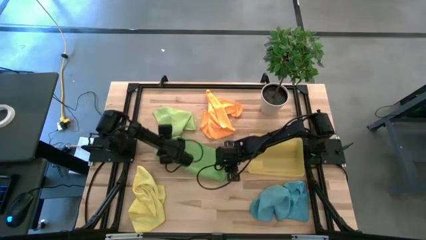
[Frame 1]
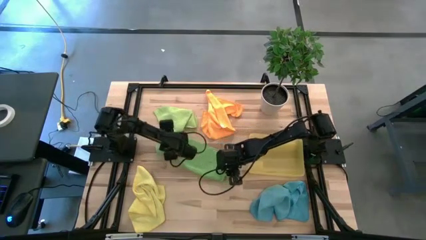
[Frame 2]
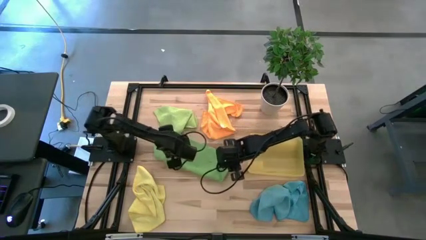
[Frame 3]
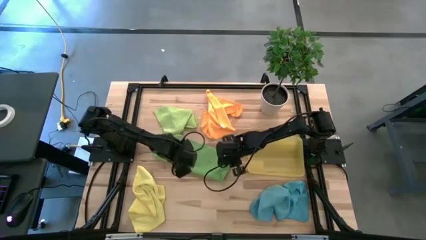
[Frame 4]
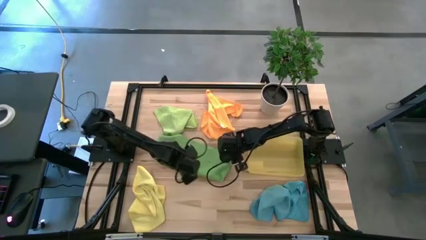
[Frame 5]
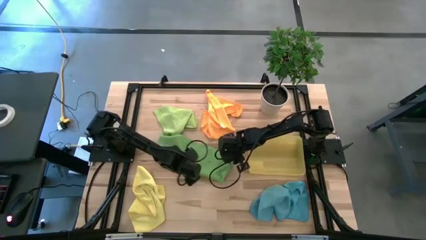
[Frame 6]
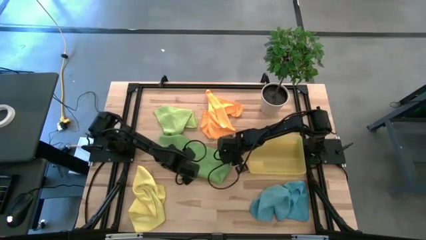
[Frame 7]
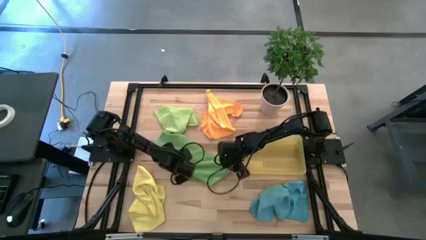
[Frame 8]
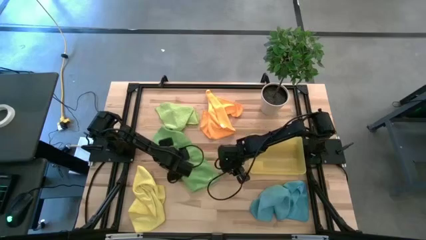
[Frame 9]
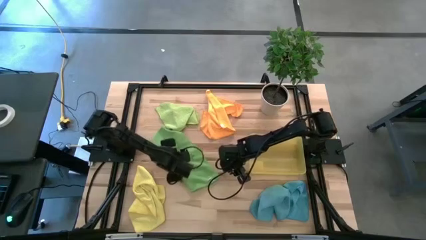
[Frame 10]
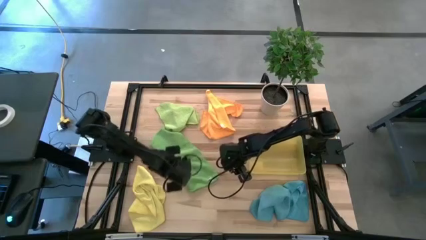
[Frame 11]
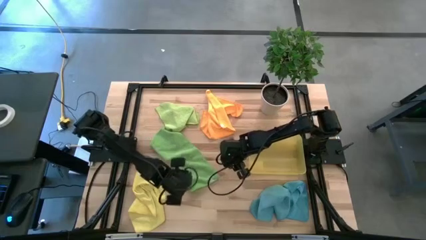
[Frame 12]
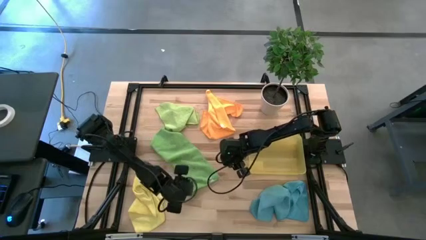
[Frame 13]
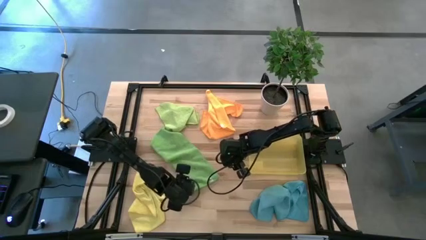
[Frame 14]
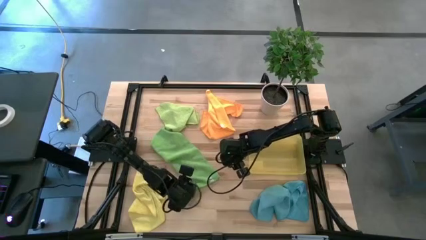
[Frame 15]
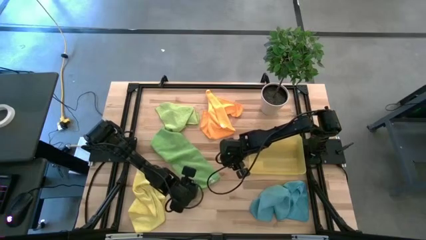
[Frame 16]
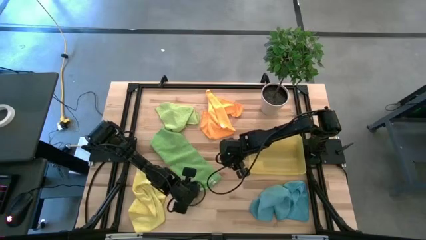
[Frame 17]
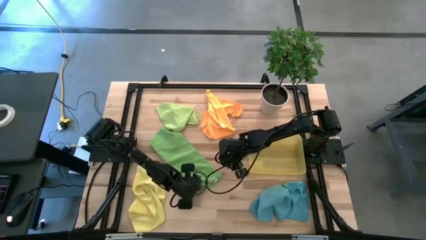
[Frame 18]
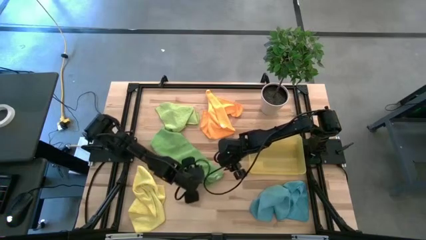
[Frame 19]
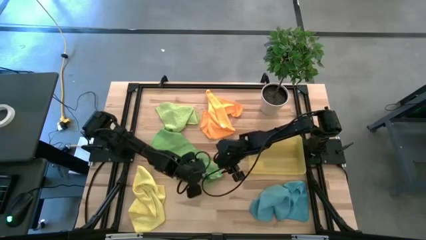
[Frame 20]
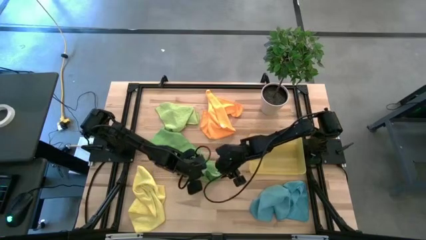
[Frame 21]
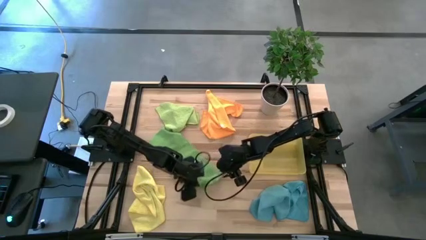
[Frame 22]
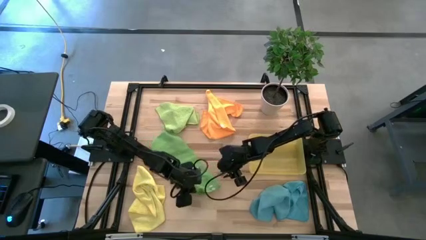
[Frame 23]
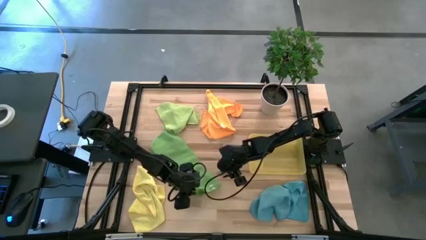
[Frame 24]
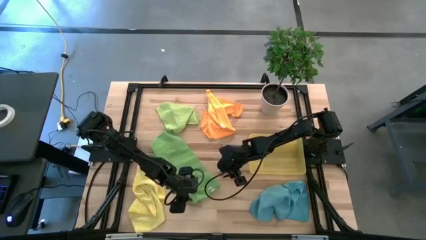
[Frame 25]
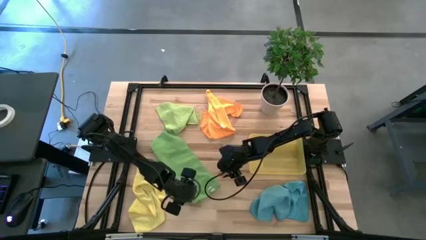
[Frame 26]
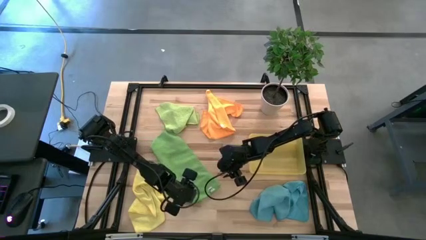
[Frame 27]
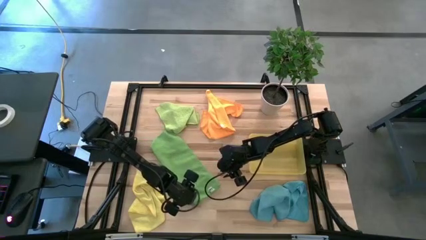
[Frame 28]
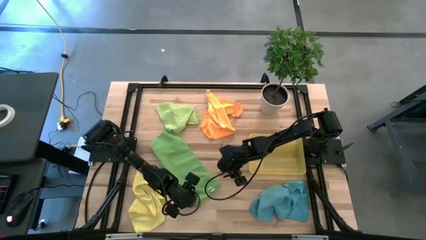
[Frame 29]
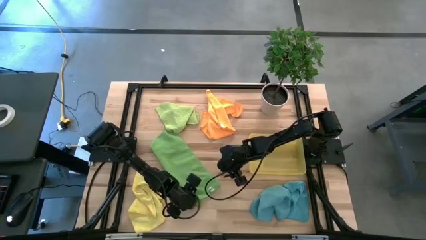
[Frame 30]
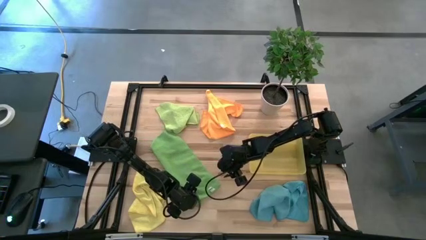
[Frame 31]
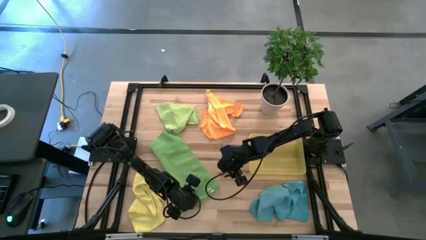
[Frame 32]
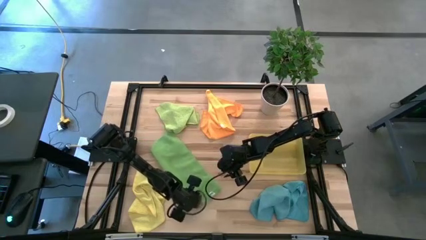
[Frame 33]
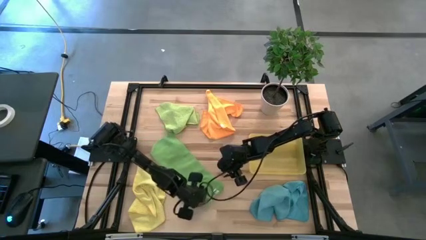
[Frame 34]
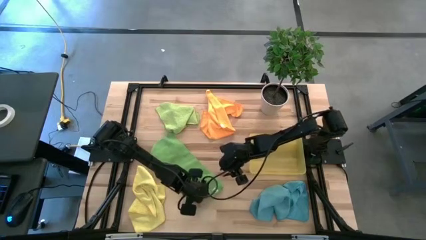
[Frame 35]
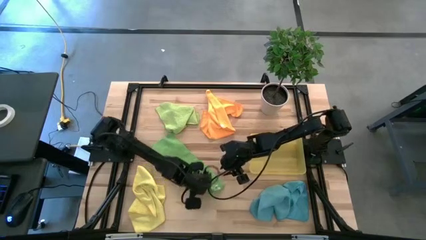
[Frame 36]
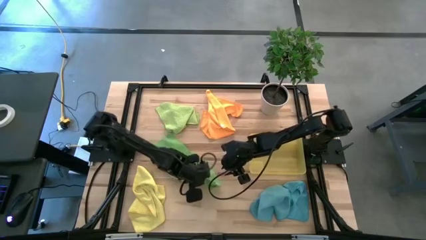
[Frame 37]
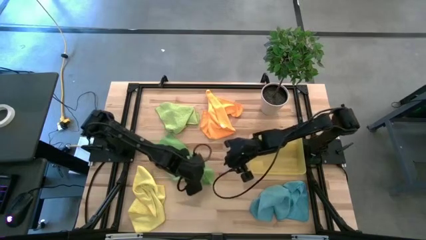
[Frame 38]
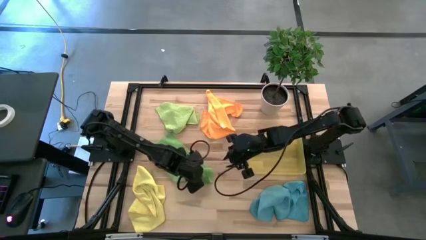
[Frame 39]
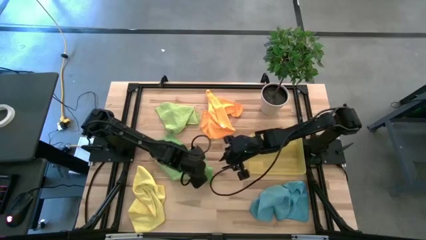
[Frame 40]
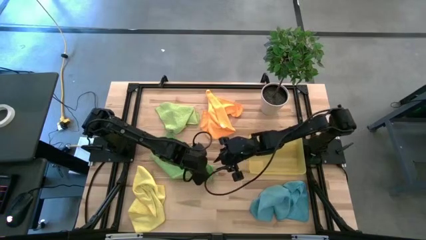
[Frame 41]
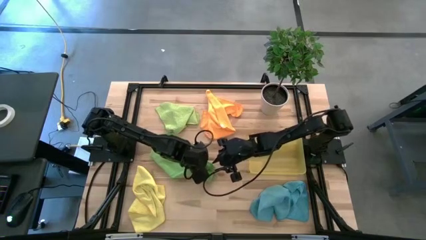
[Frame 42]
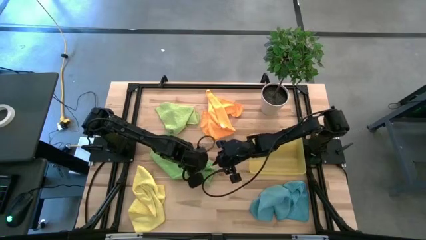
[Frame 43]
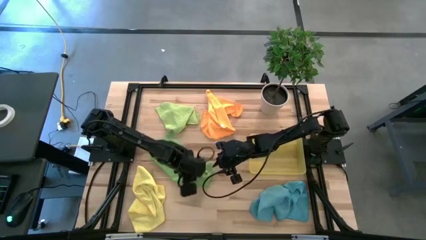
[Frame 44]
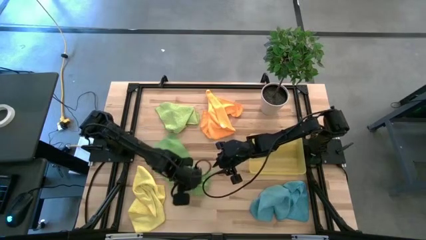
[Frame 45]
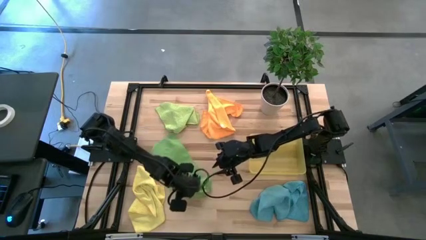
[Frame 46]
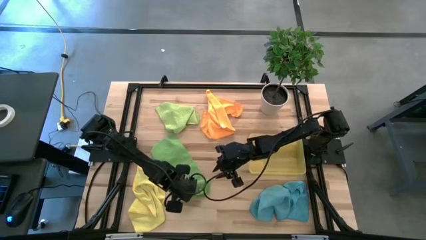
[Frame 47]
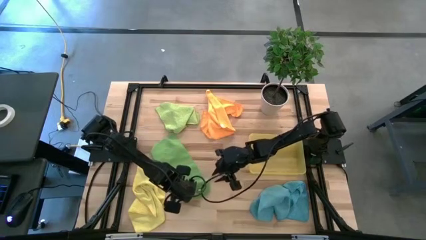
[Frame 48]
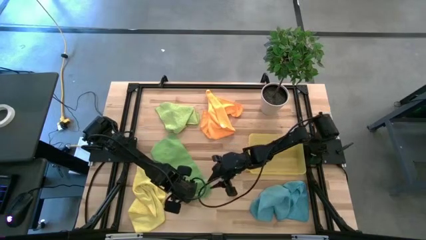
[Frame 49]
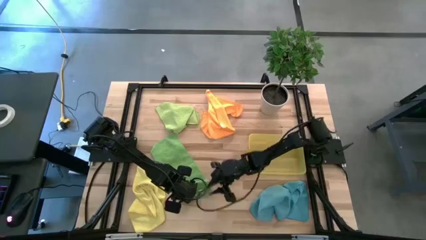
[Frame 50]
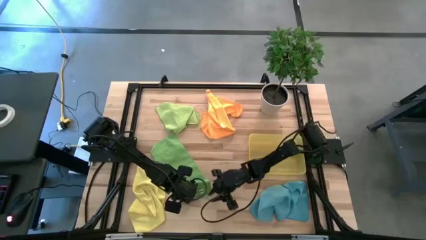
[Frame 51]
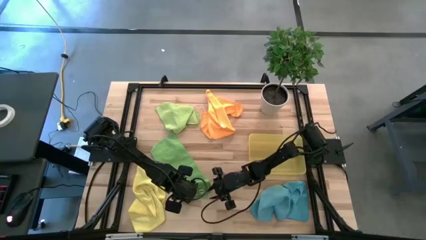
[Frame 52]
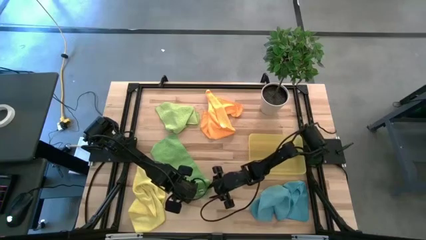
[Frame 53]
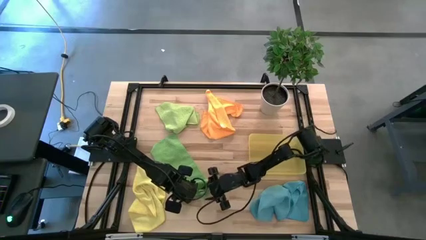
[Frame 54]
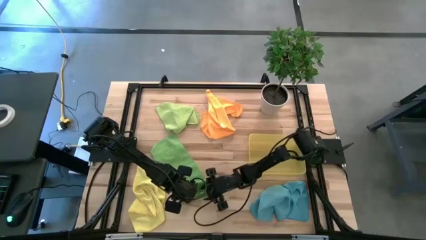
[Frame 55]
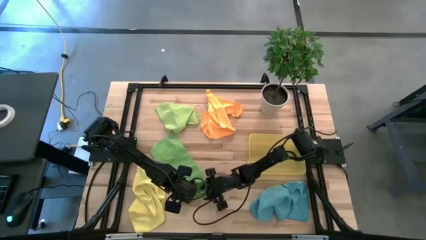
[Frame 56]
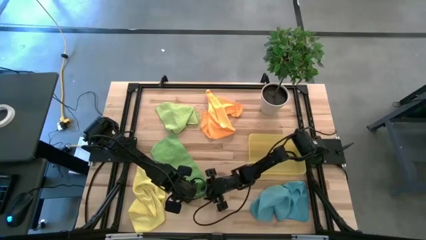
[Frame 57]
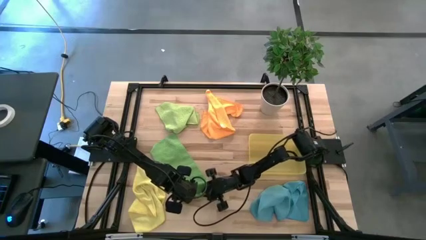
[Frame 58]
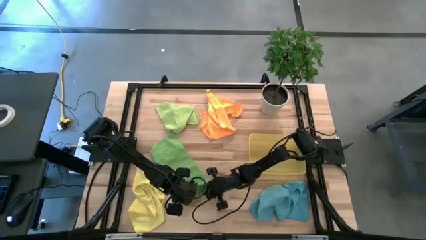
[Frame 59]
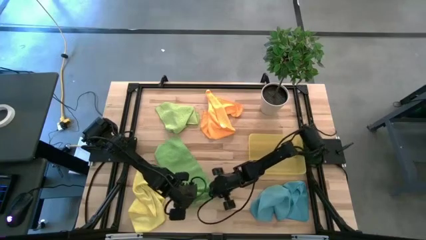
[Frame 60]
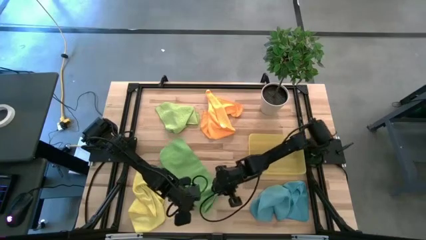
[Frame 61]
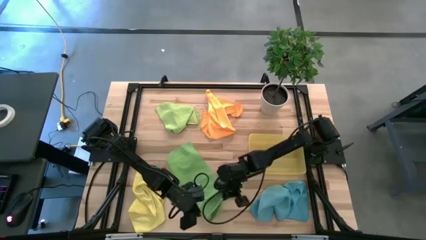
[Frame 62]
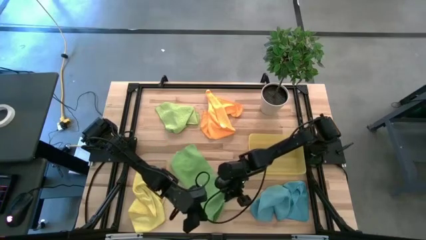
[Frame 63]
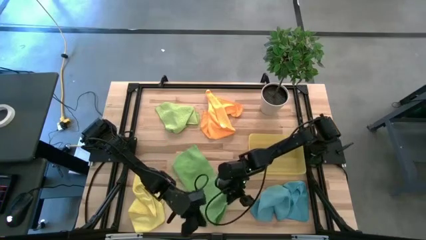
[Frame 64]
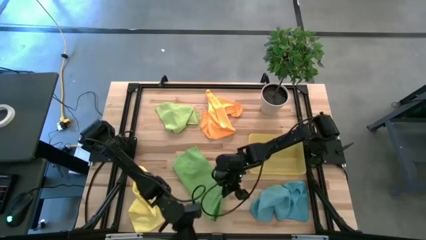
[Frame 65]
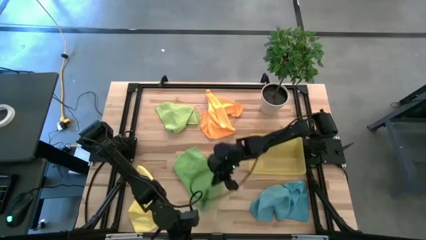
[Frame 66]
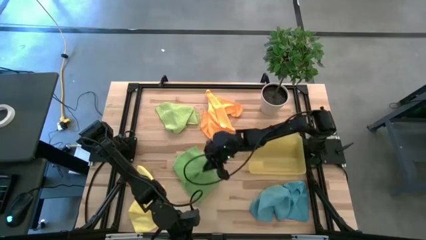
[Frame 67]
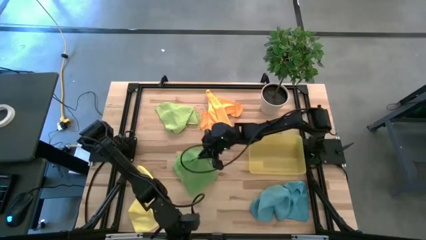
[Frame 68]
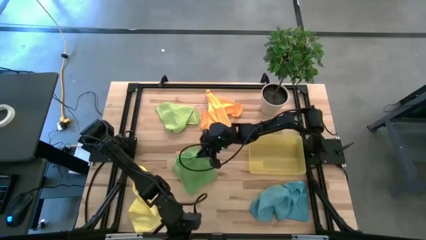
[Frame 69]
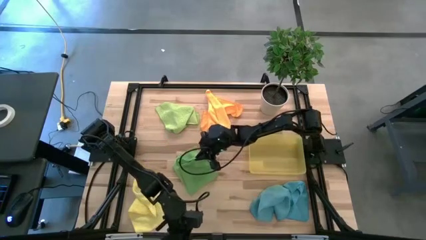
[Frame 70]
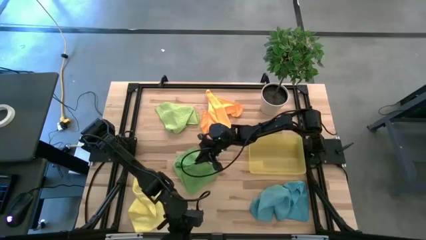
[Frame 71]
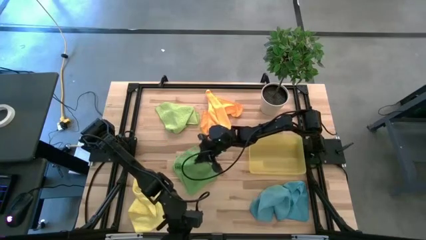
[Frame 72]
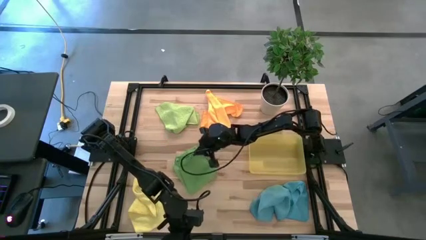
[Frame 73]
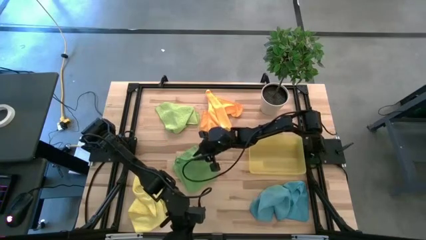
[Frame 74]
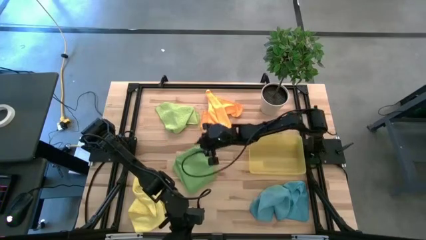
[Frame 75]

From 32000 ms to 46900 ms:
Task: Fold microfiber towels
Fold the bottom green microfiber cloth
